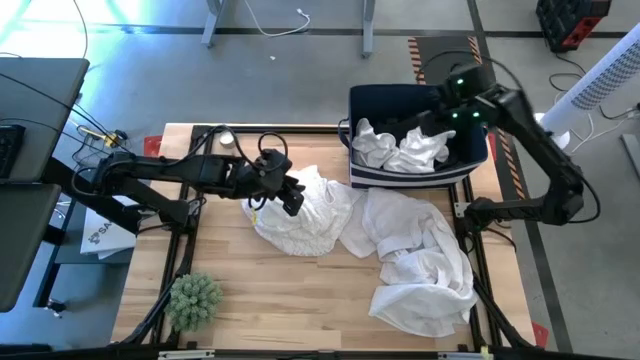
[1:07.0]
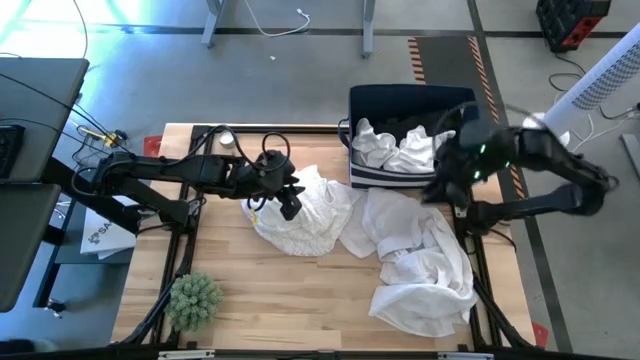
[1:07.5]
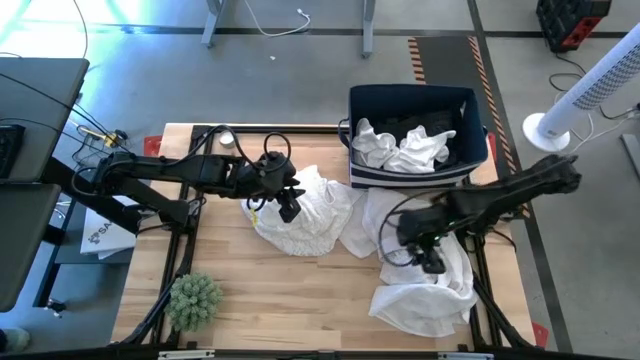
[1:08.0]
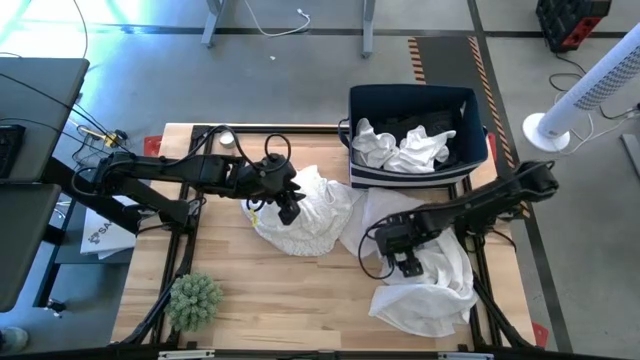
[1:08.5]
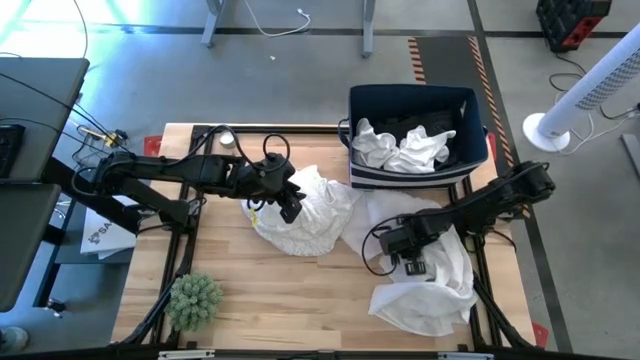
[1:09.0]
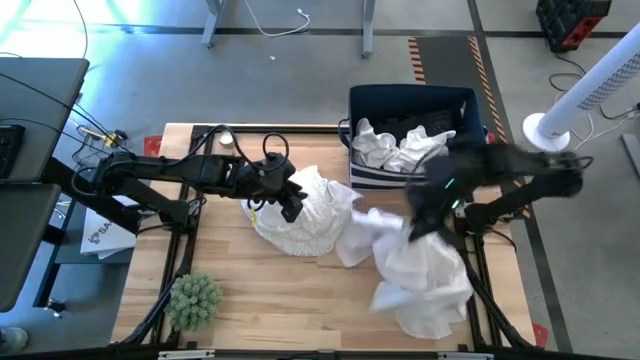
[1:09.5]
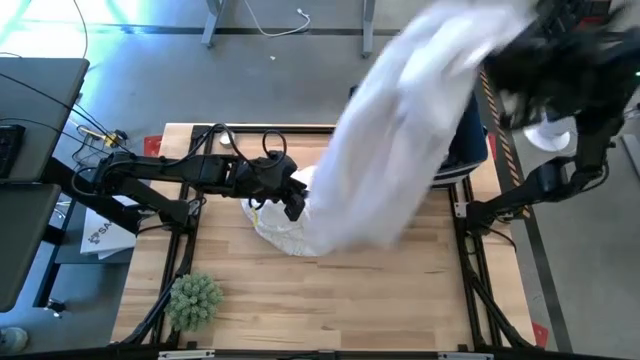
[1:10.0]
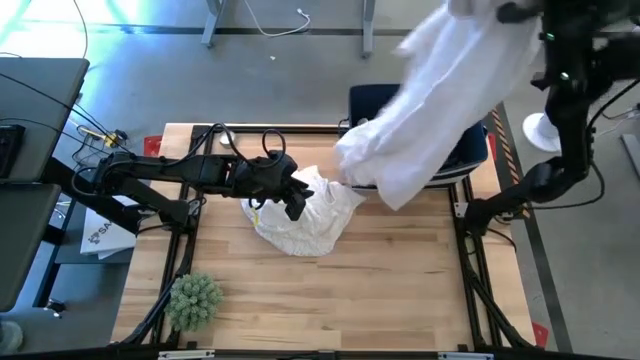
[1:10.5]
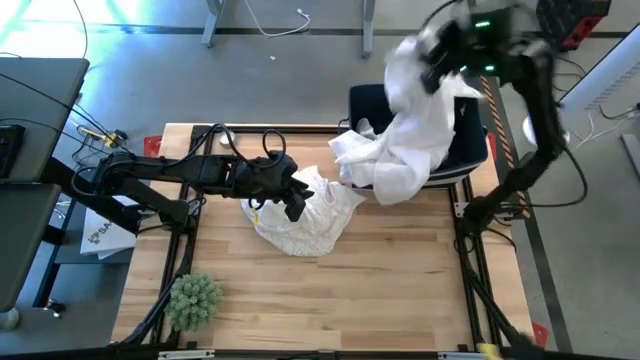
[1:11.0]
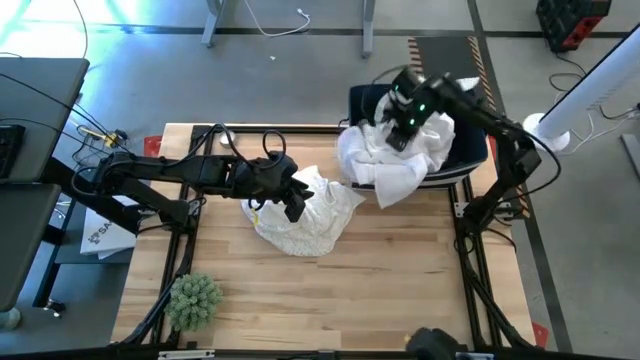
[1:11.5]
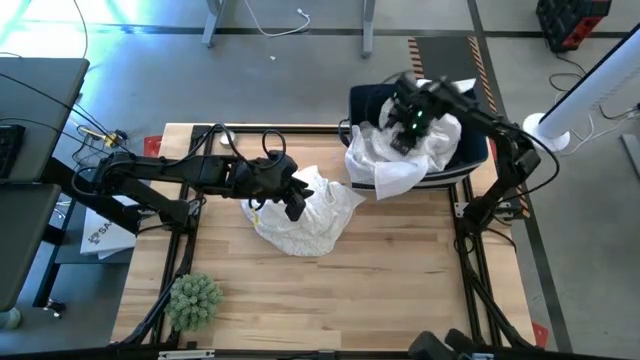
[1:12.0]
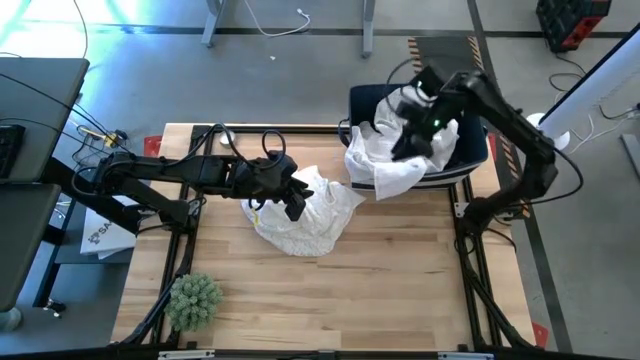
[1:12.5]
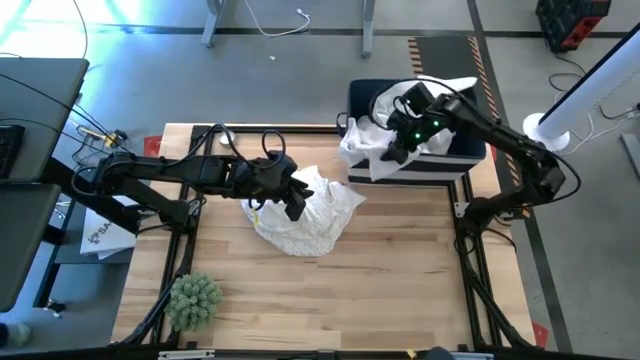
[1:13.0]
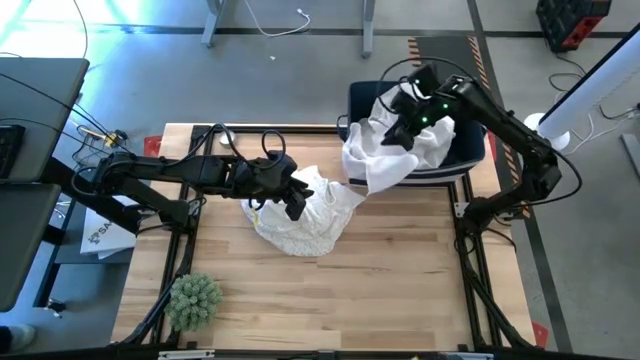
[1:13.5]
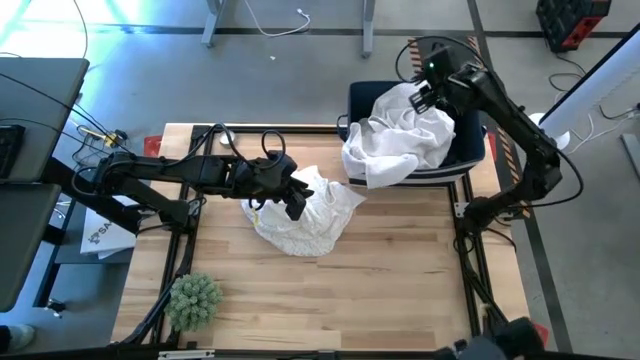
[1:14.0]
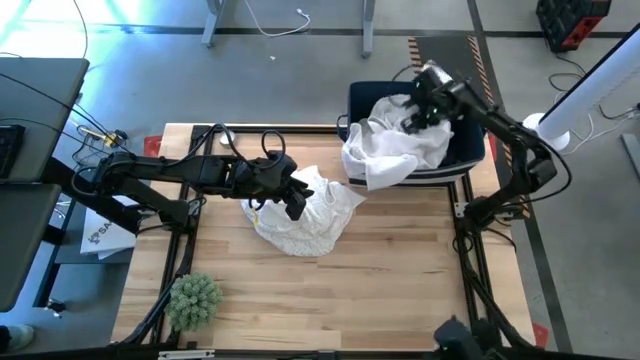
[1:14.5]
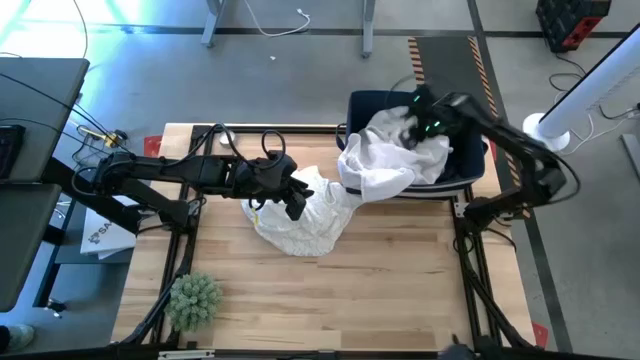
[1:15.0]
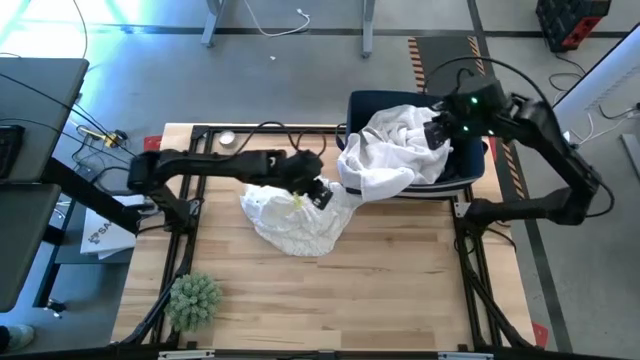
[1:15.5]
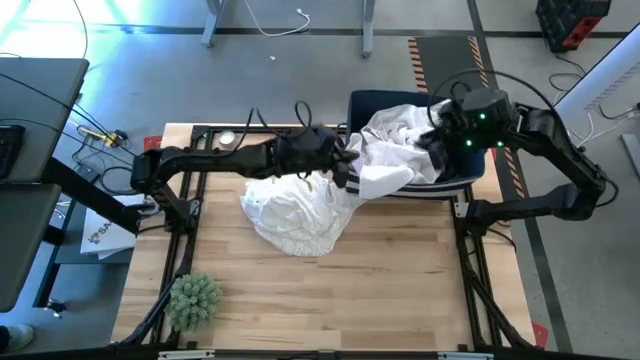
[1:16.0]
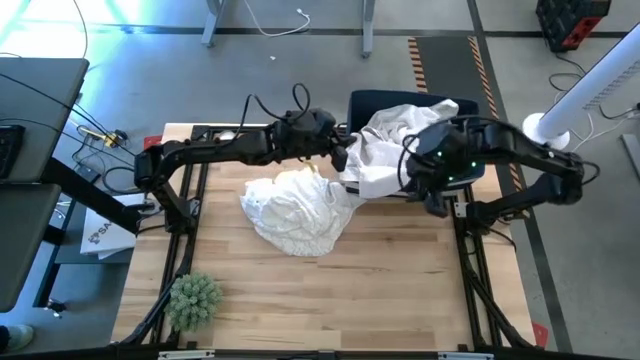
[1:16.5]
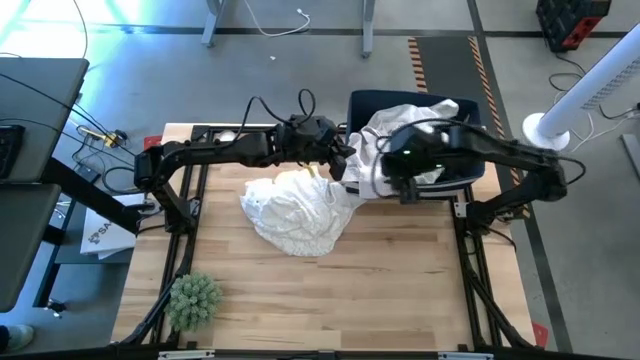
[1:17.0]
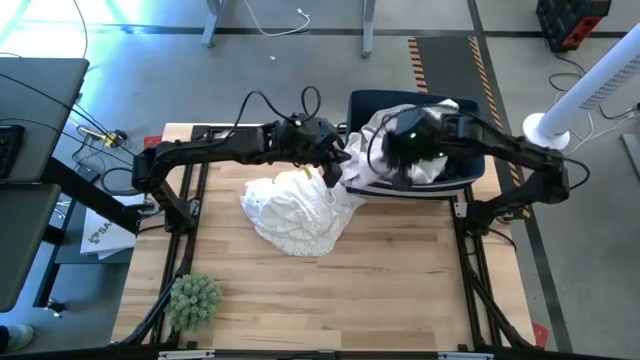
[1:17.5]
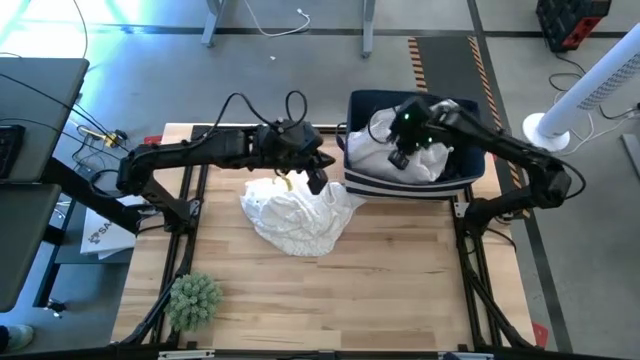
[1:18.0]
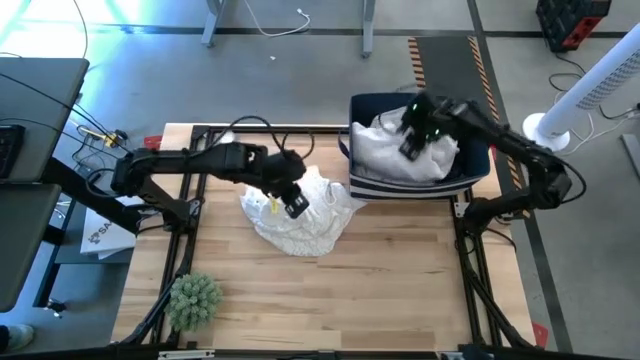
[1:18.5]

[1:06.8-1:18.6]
Task: Sort clothes
Put the white shirt into the blue laundry organizer

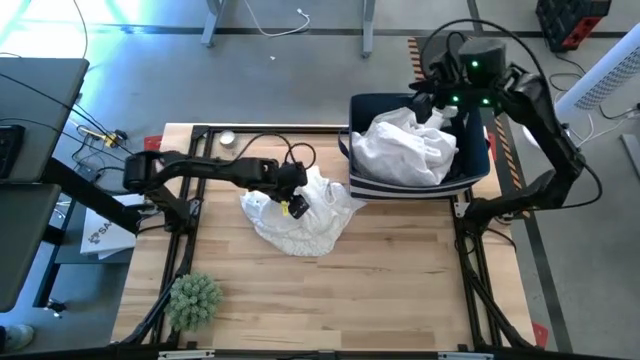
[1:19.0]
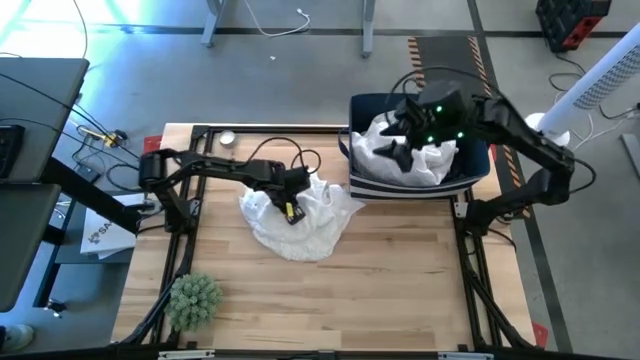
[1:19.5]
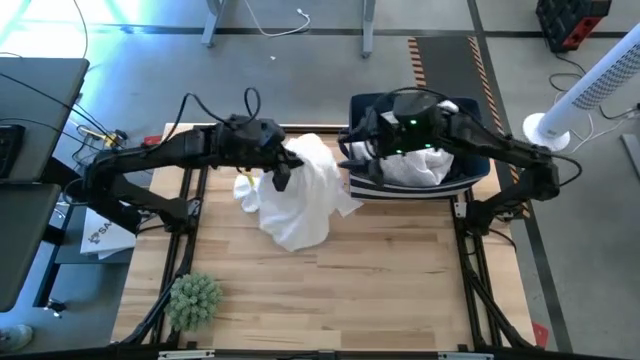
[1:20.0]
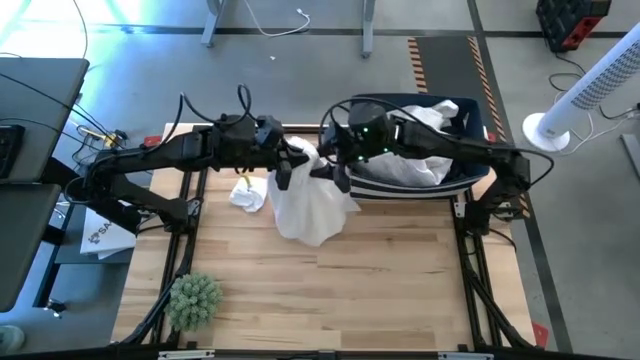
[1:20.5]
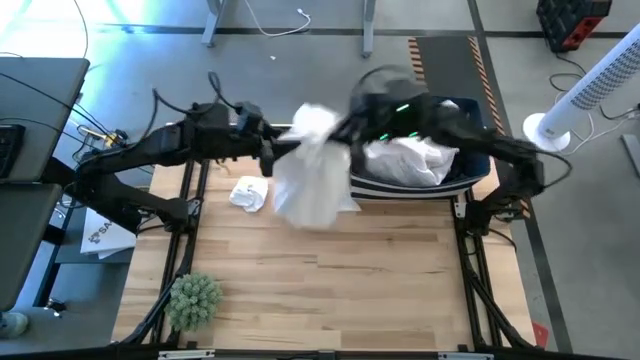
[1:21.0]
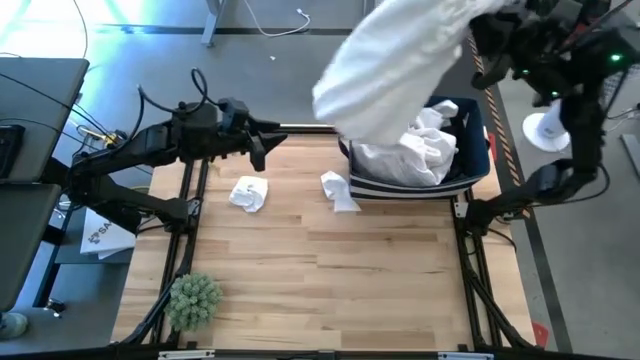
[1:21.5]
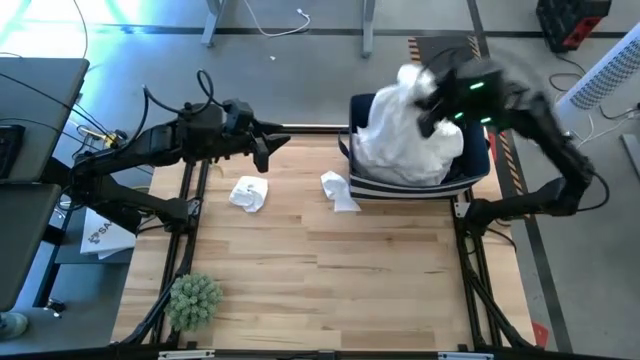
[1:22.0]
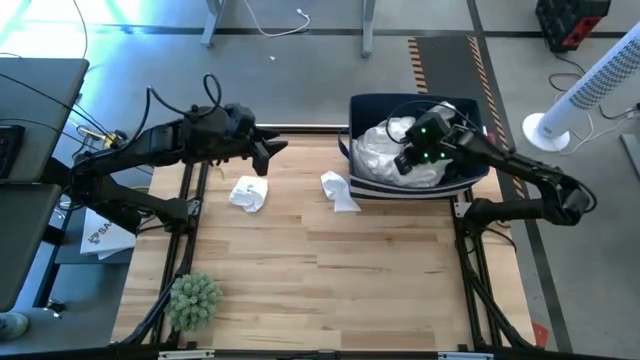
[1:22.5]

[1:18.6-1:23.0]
Put the white dress into the blue laundry organizer

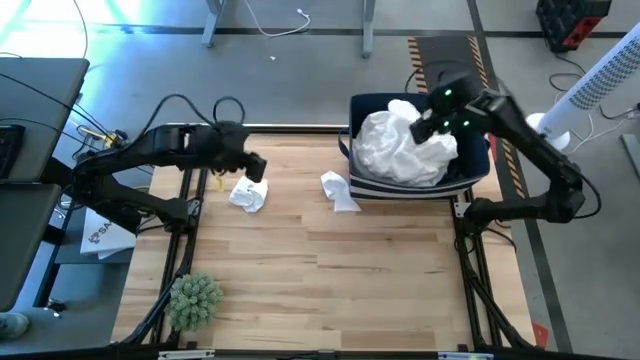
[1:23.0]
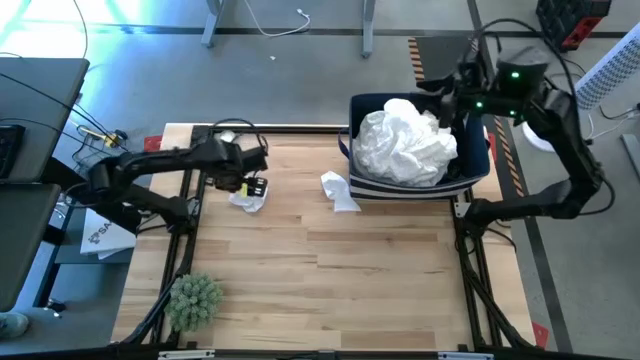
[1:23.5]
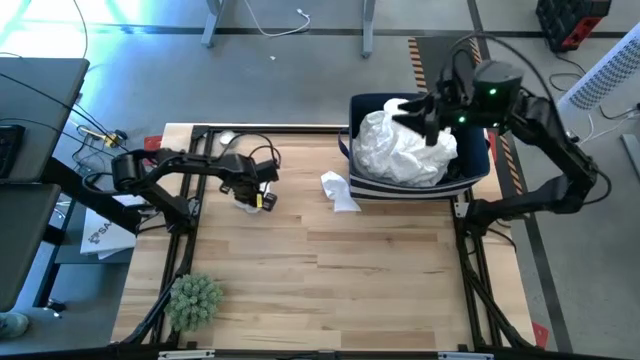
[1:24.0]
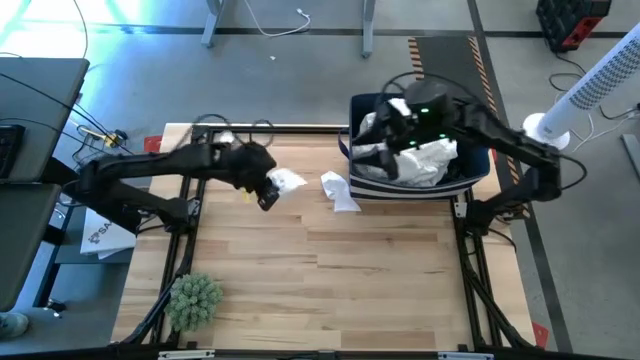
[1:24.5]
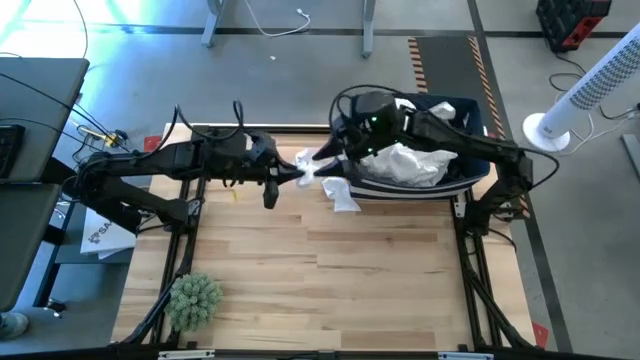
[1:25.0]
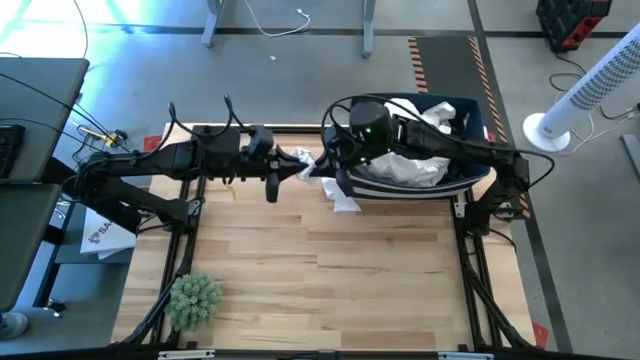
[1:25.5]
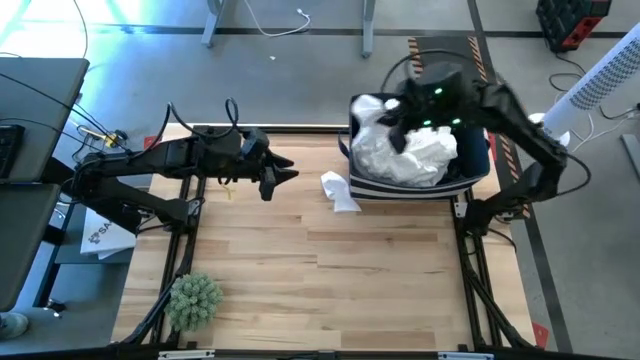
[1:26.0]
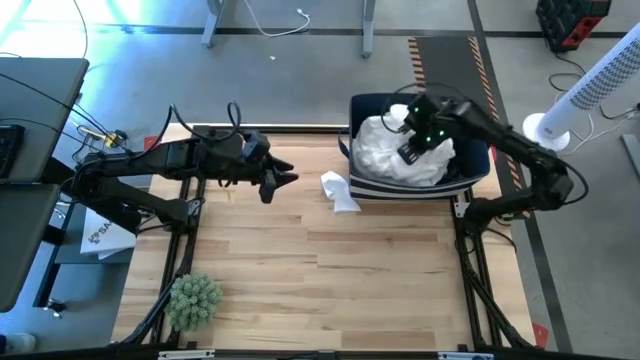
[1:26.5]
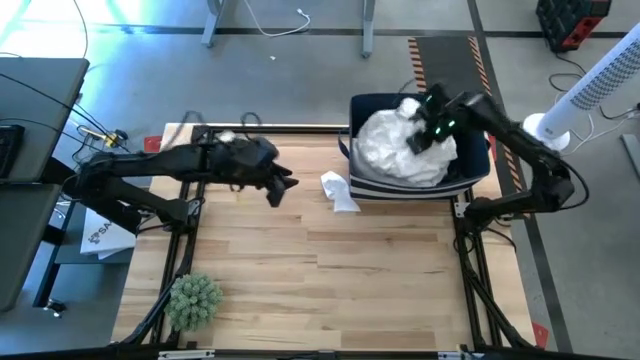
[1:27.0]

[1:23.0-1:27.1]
Put the white sock into the blue laundry organizer

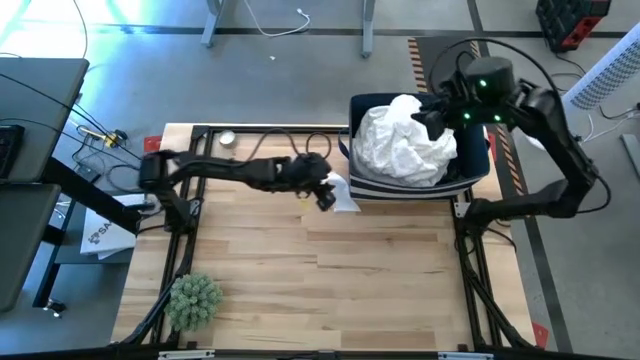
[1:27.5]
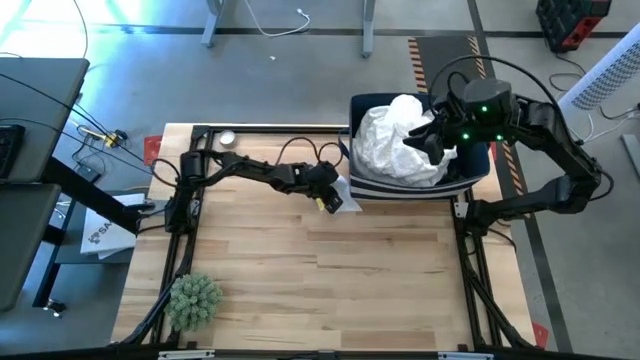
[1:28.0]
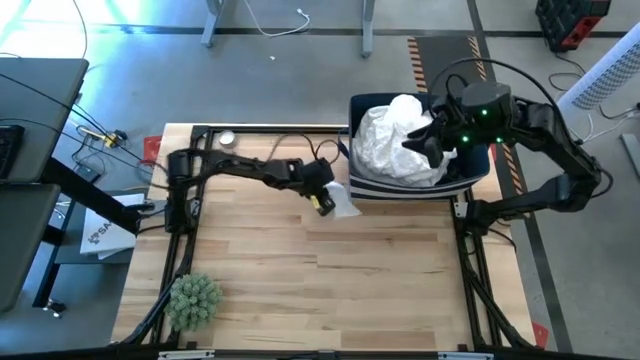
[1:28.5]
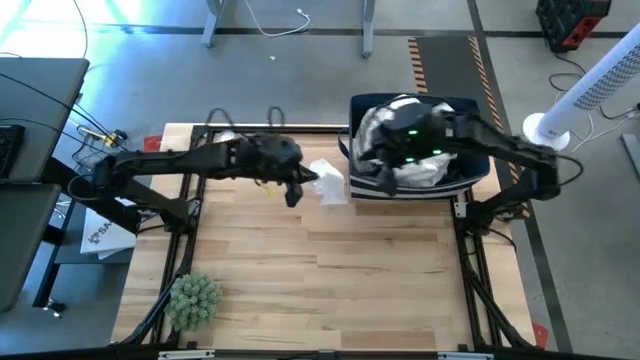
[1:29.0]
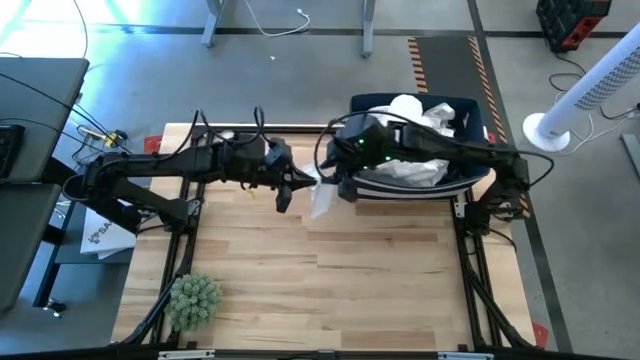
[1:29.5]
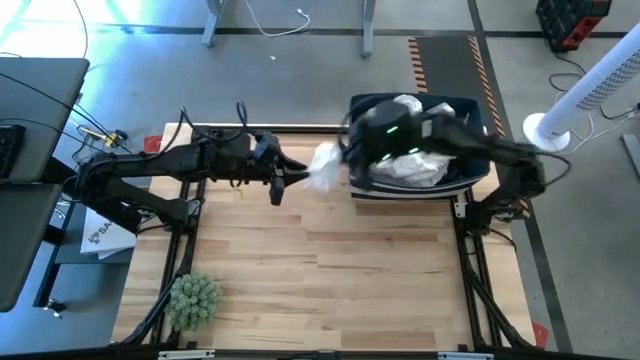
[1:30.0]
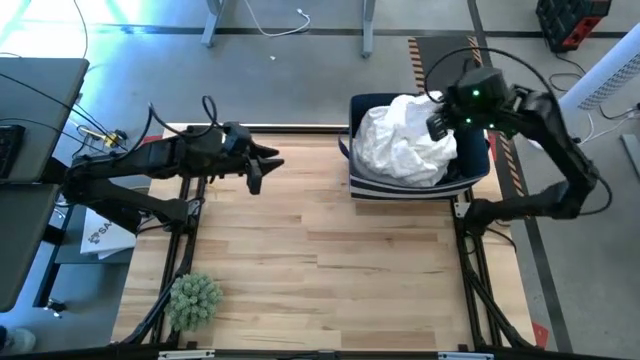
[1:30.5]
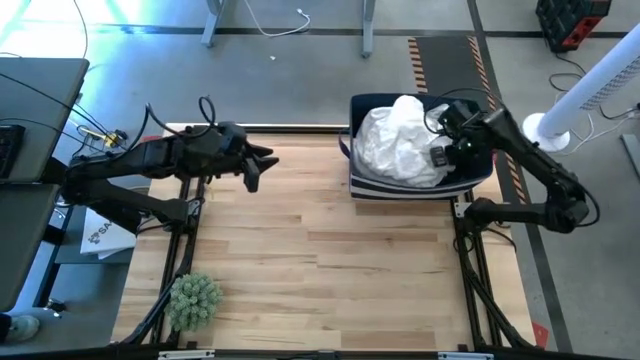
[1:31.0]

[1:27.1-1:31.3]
Put the white sock into the blue laundry organizer
